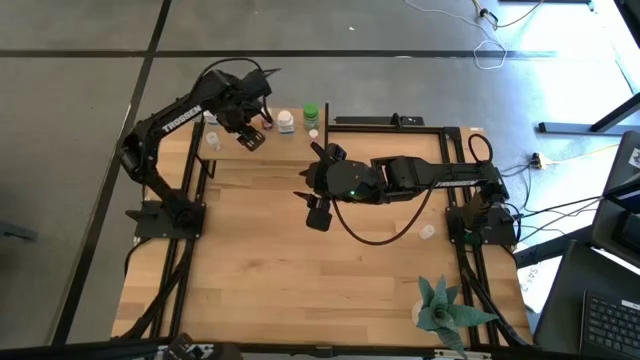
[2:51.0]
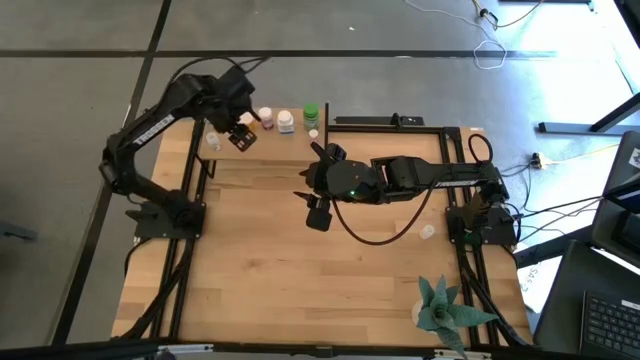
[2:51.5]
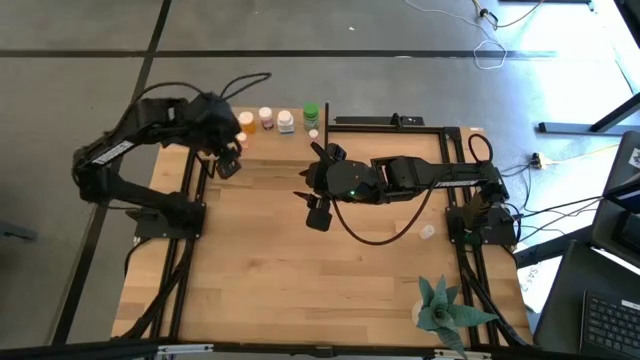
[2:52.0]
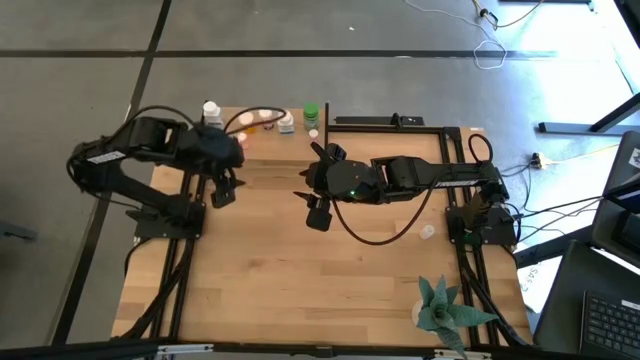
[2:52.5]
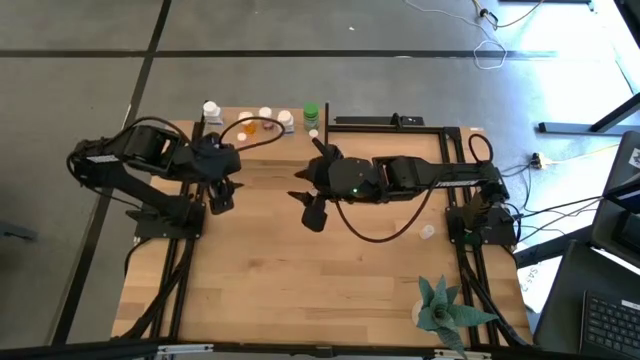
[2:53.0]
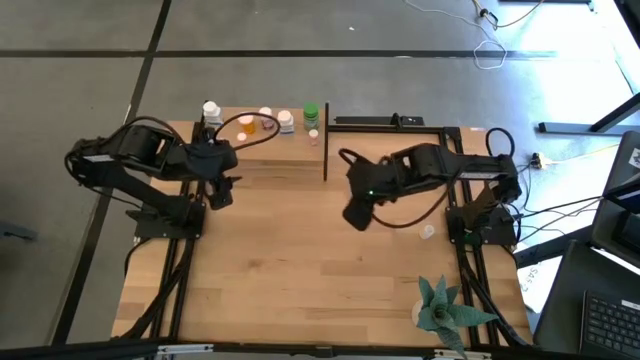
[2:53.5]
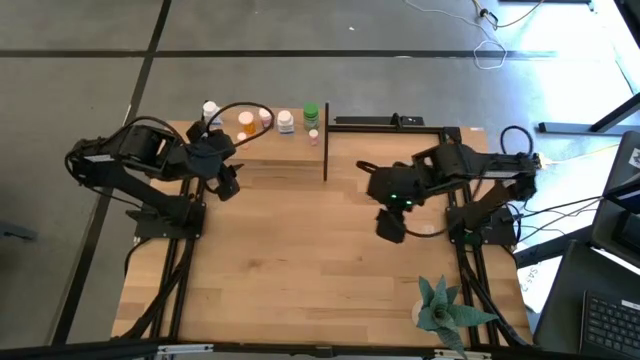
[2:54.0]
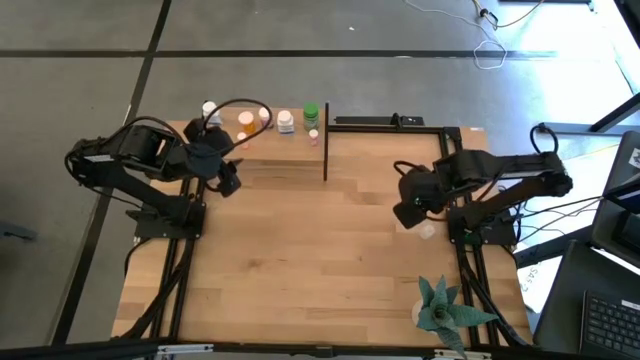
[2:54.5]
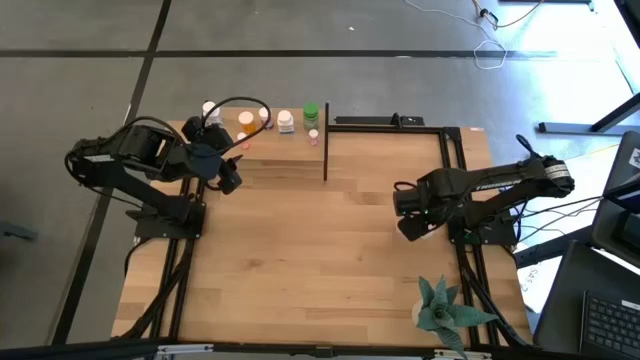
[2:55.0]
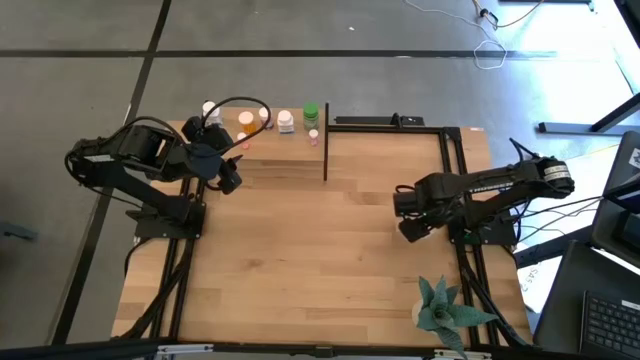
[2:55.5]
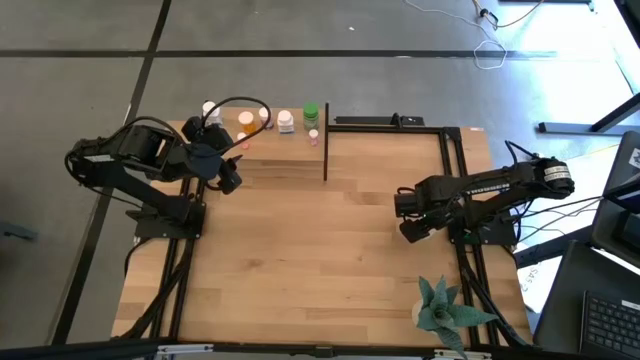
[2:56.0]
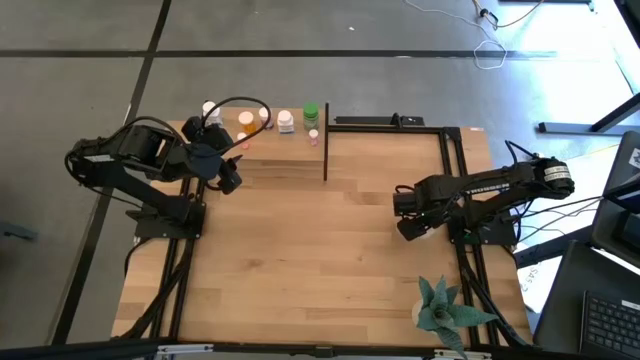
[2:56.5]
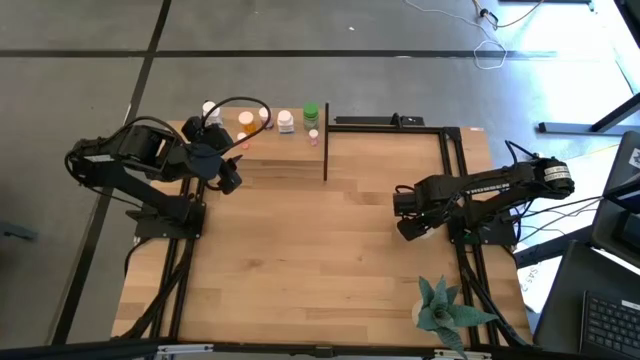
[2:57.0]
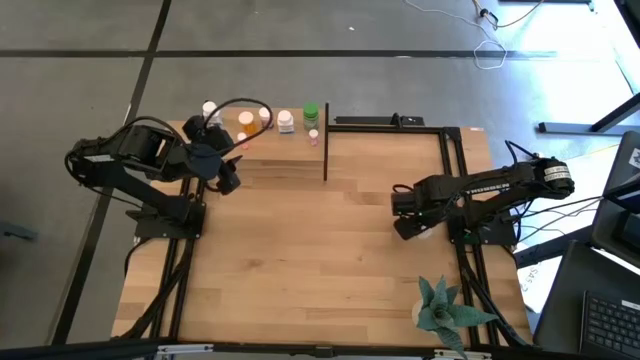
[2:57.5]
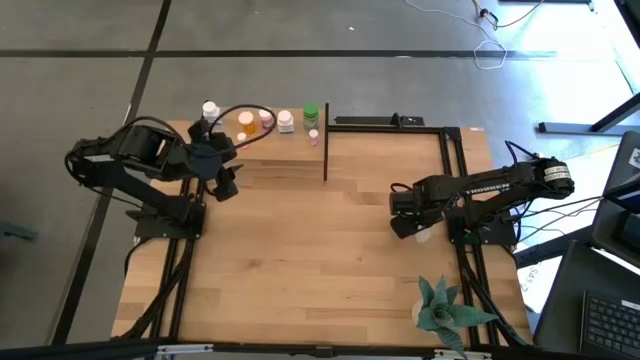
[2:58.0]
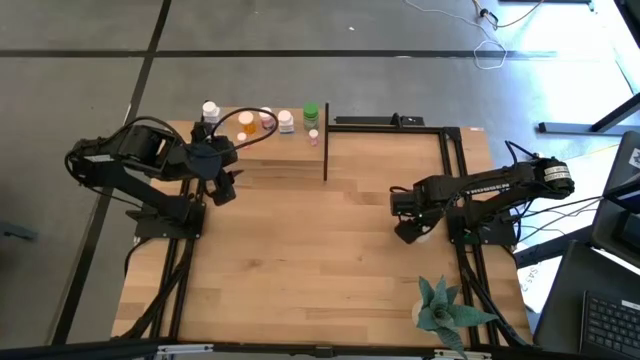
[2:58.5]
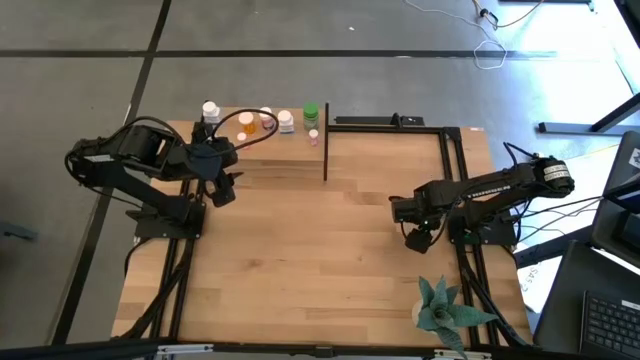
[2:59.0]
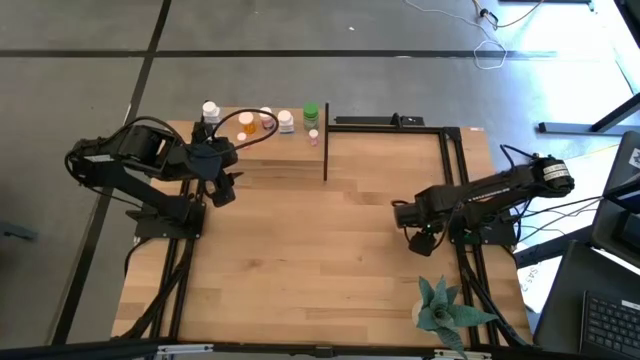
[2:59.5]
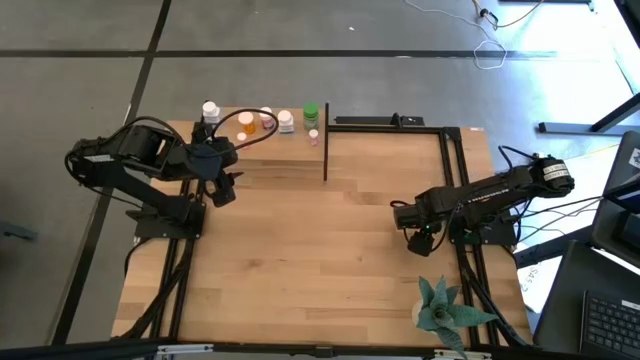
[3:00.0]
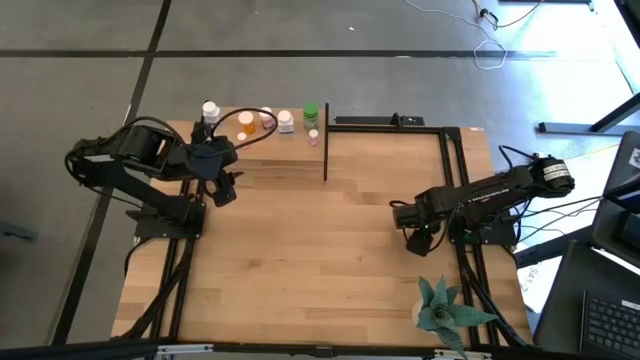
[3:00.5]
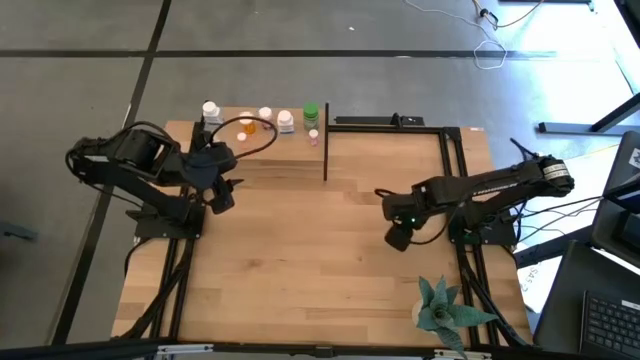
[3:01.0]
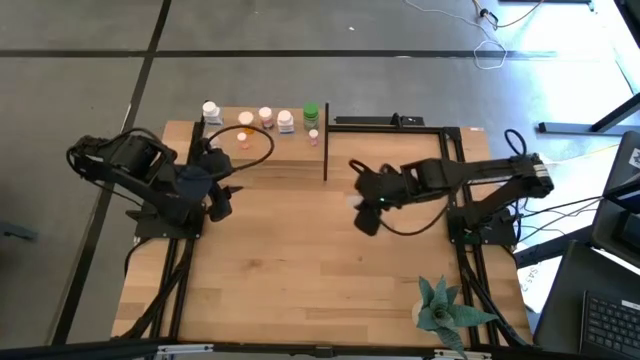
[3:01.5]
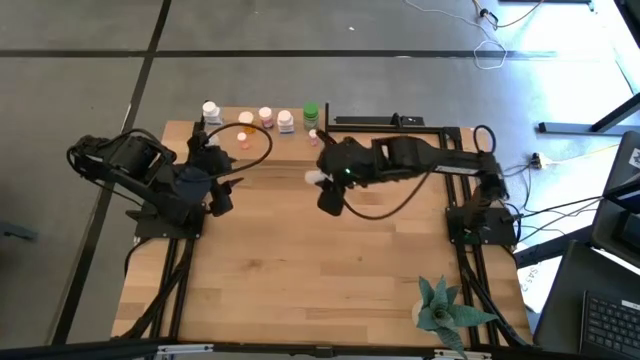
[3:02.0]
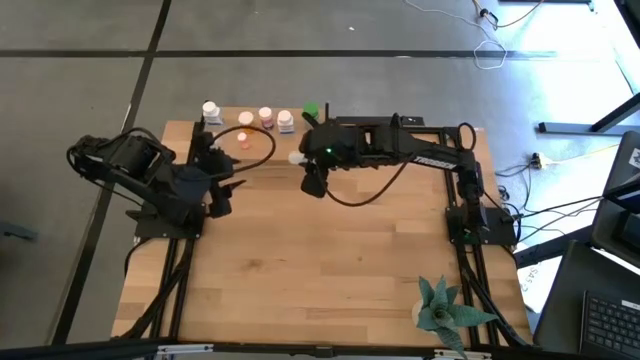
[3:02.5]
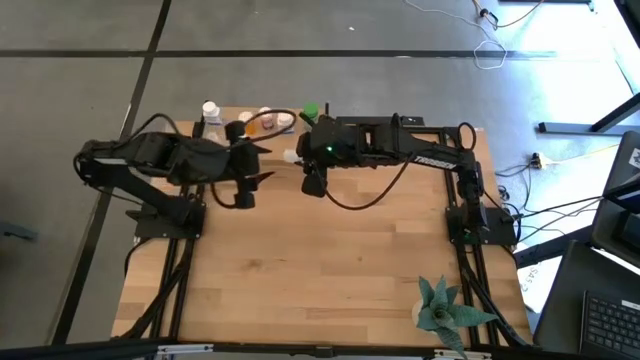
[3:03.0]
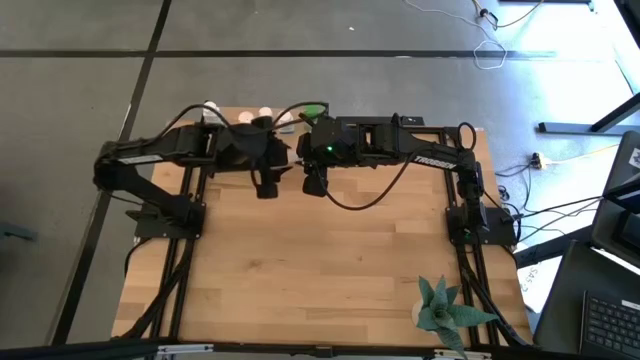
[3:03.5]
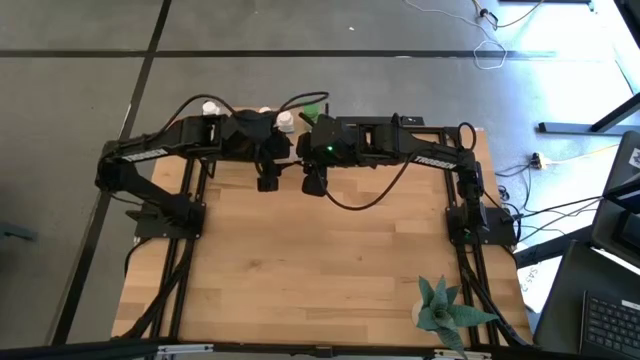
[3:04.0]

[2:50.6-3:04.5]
Task: Pick and place medicine bottles onto shelf by color
Put the transparent pill bottle on the shelf

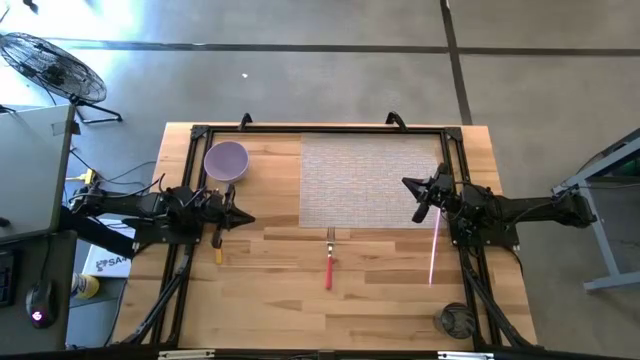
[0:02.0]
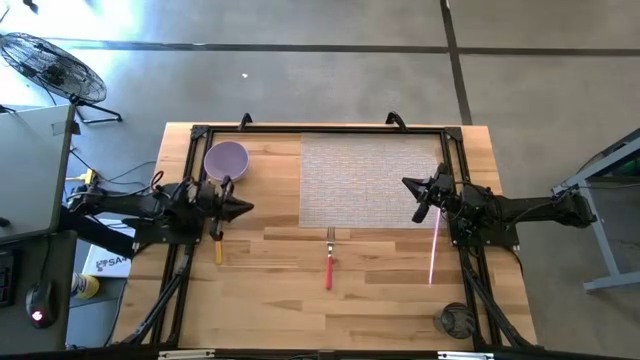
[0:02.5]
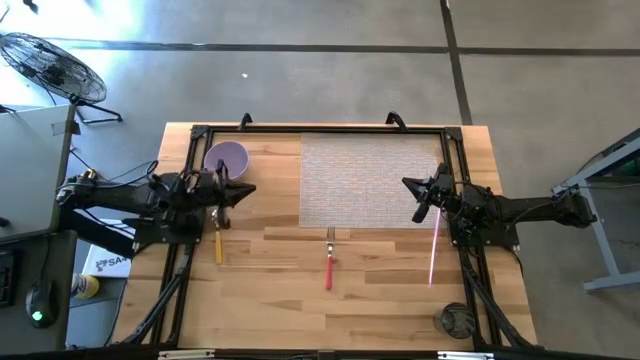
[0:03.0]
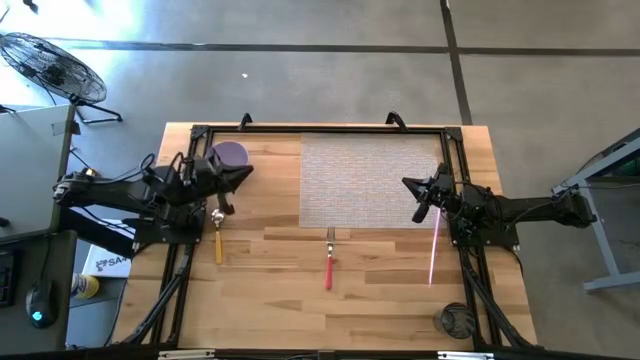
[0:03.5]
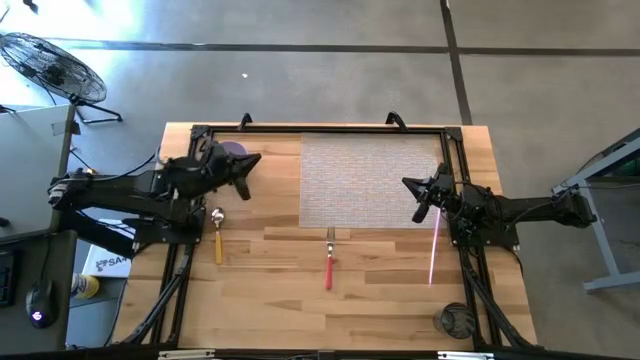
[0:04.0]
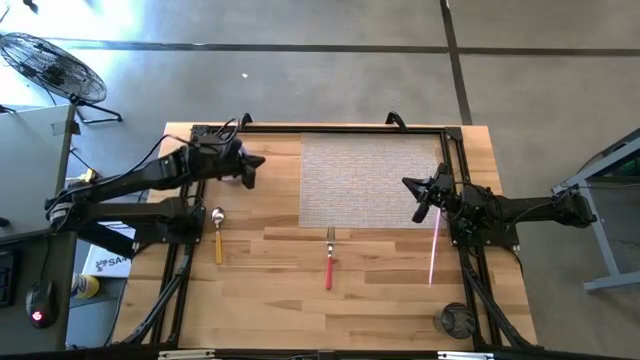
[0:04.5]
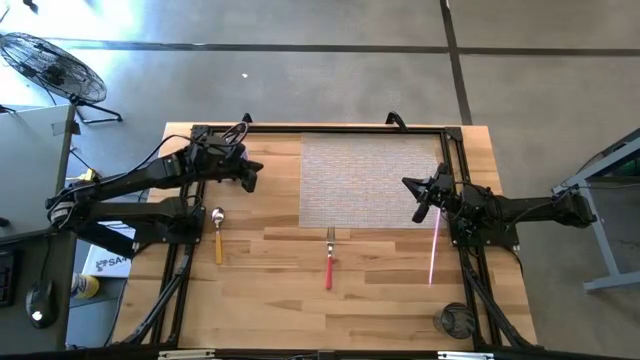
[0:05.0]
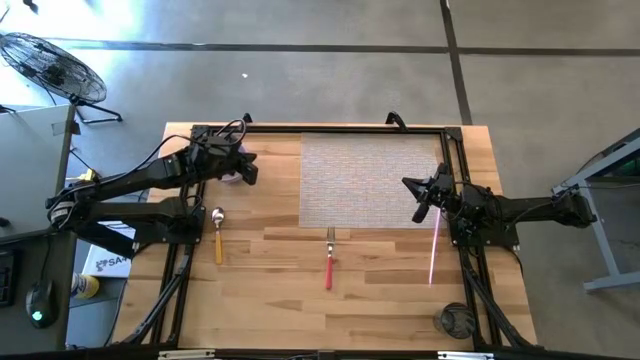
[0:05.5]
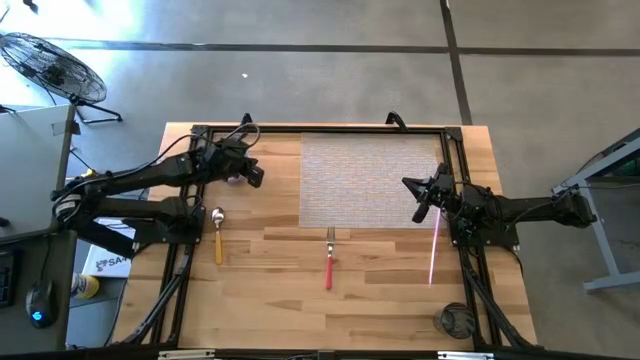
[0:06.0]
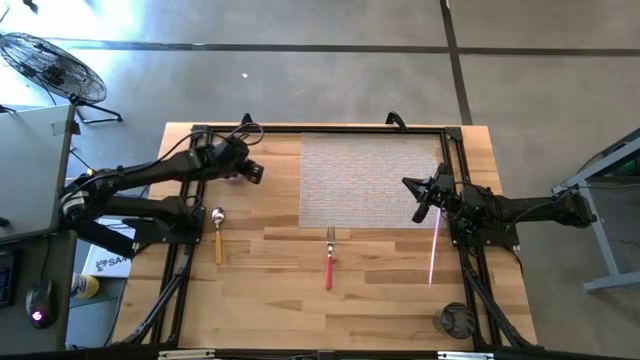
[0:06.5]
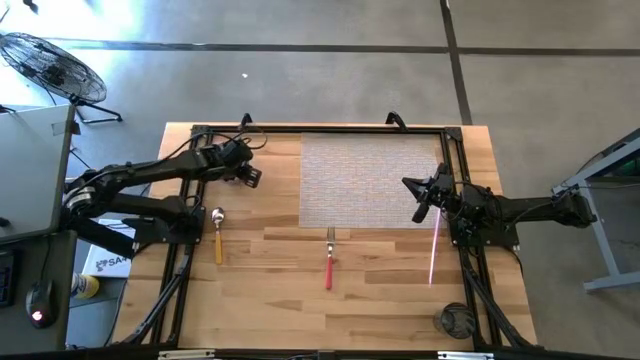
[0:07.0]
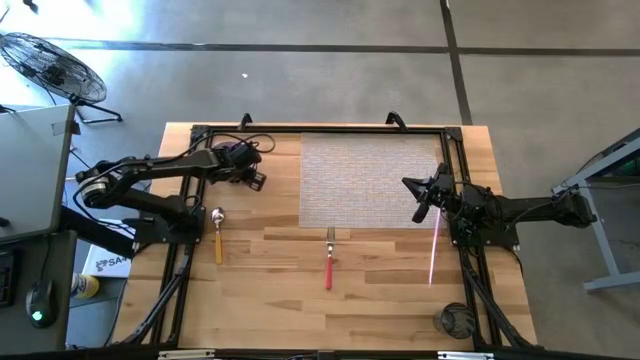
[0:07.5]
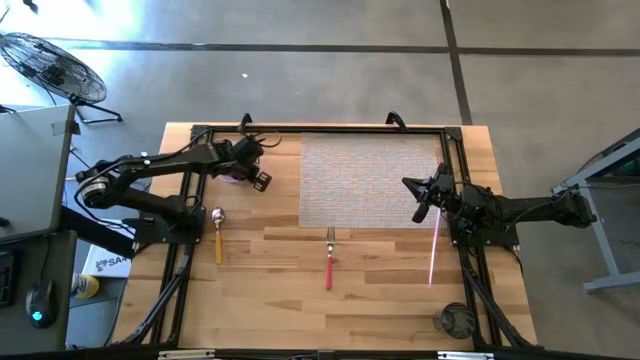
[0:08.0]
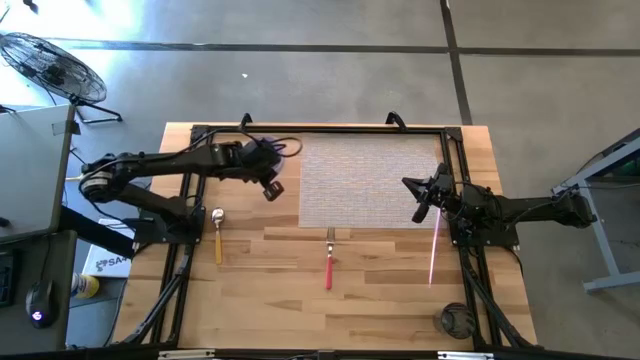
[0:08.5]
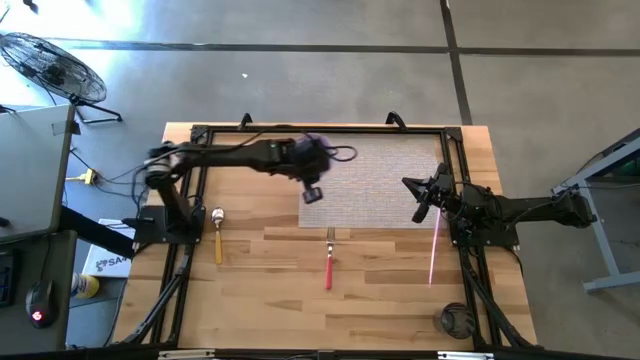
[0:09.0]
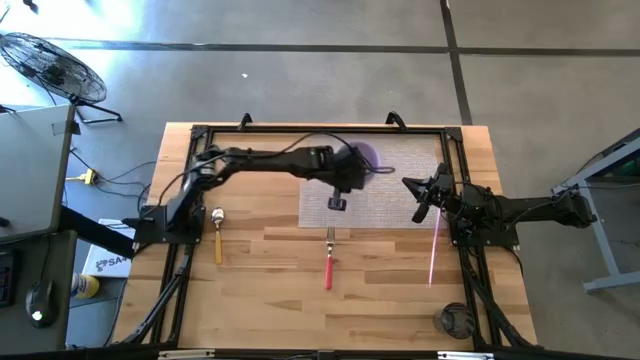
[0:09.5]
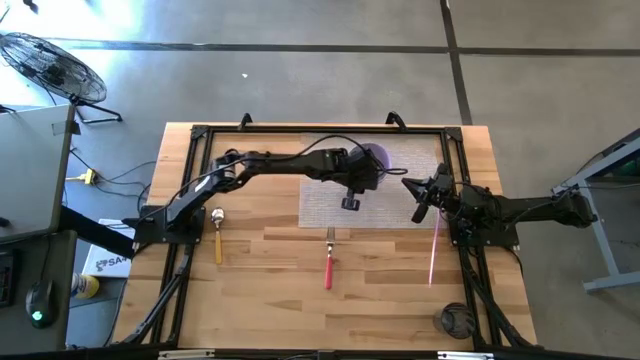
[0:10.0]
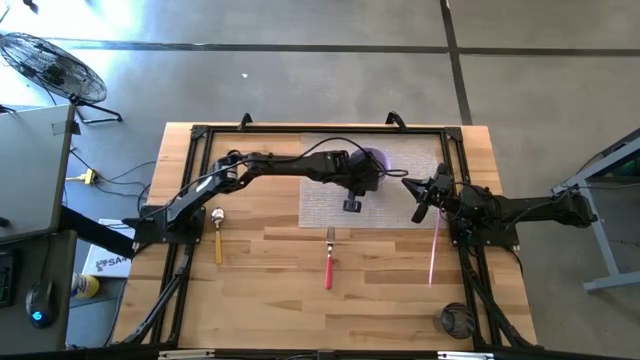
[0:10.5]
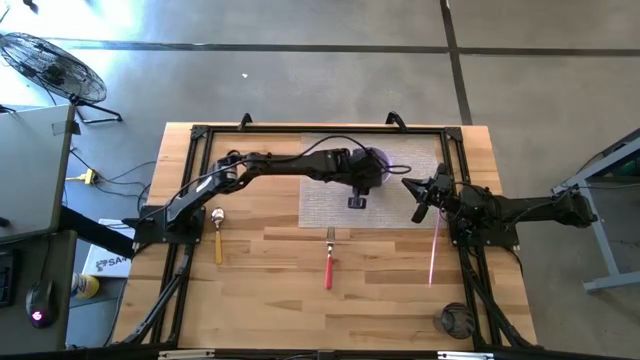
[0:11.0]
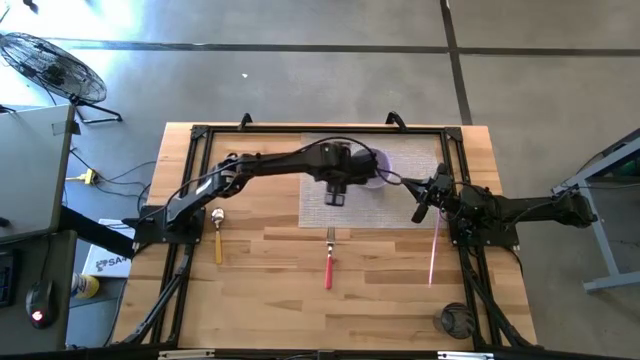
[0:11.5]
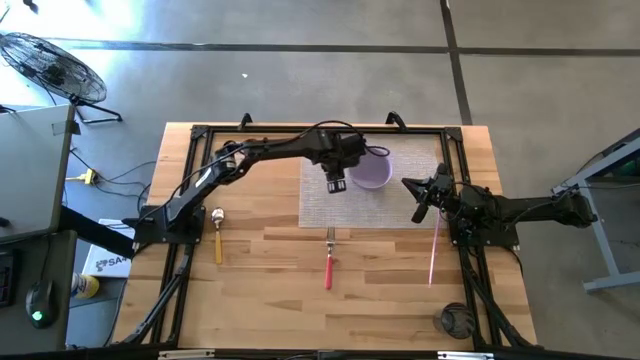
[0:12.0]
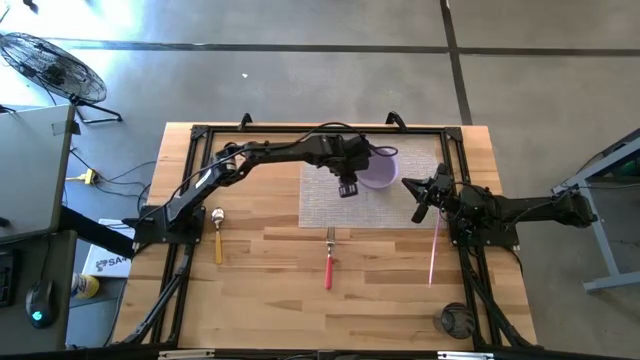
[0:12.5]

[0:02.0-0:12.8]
Task: Pick & Place Utensil
Put the purple bowl in the center of the mat
